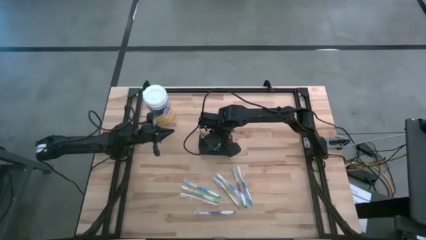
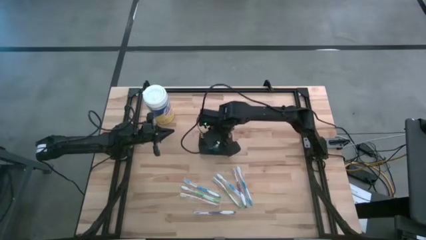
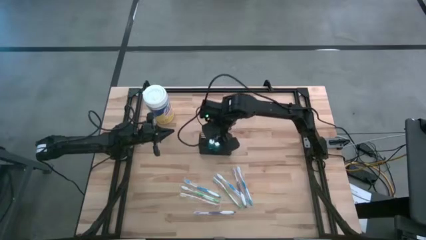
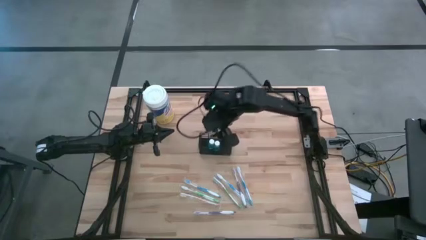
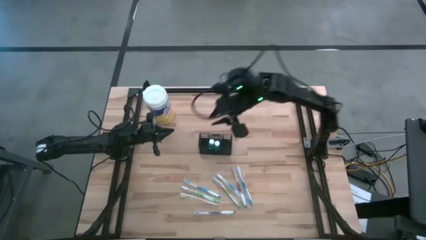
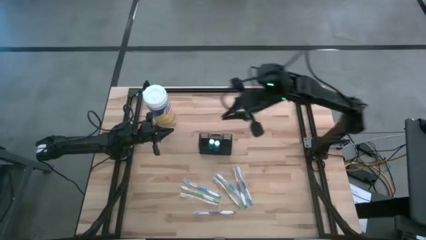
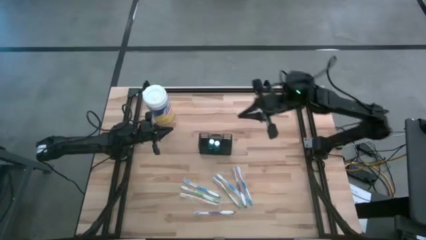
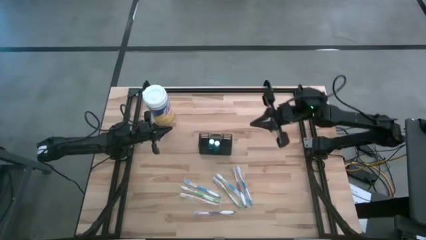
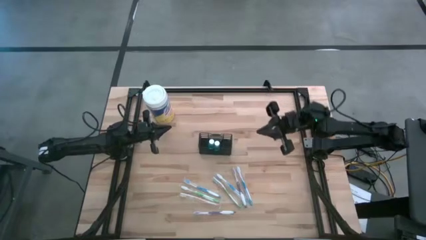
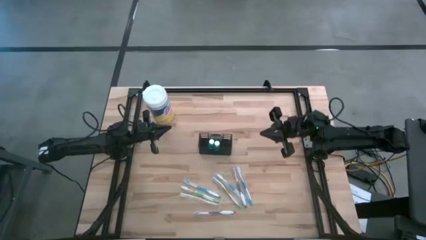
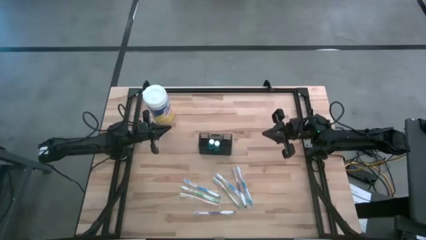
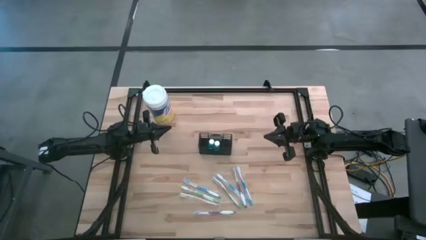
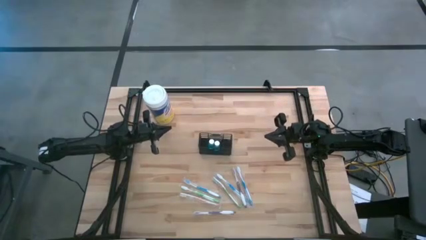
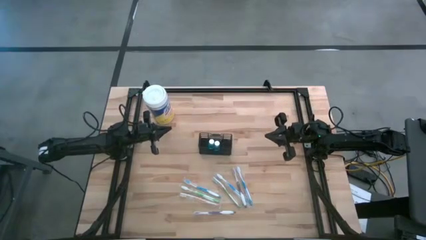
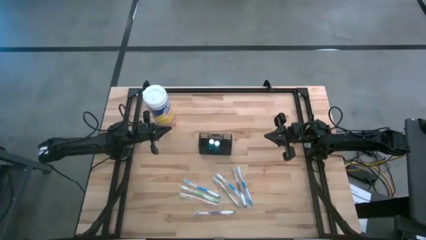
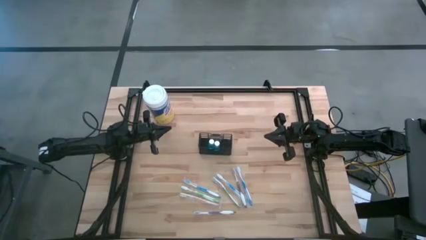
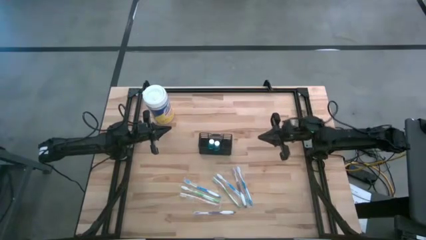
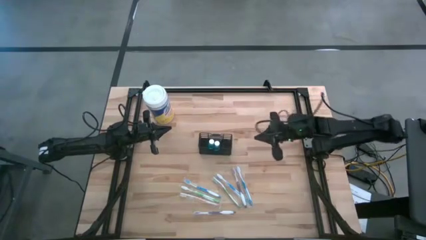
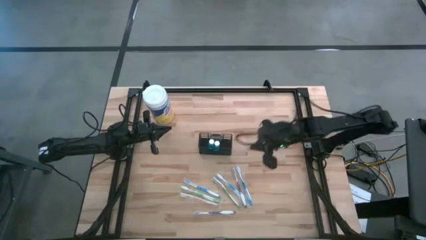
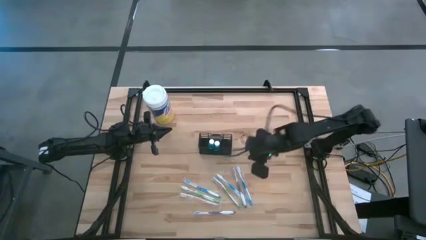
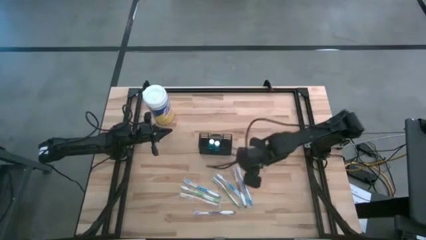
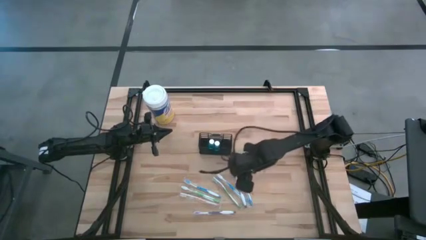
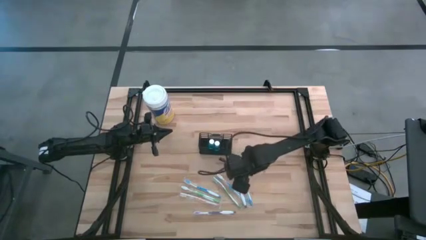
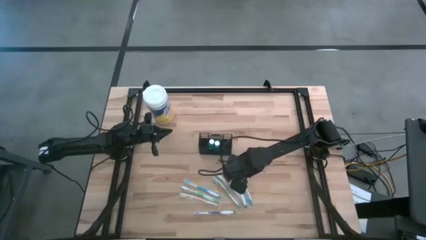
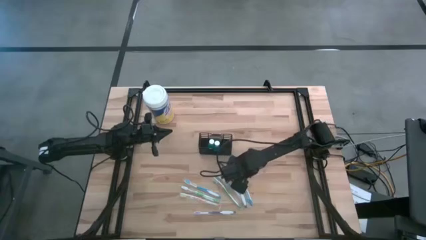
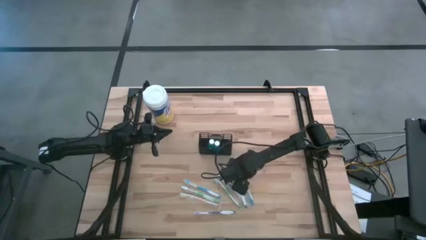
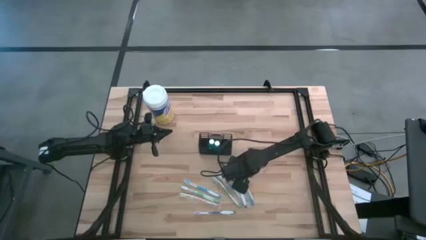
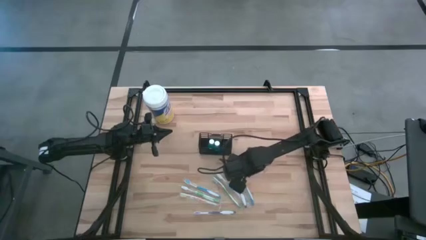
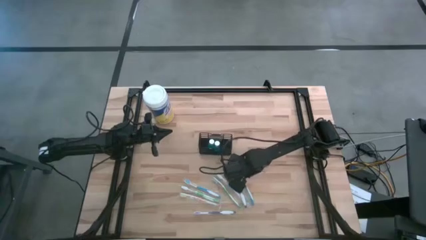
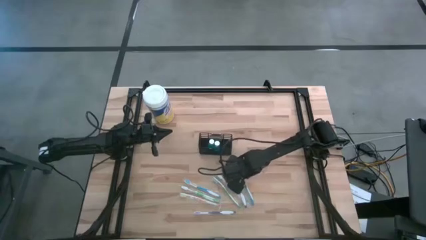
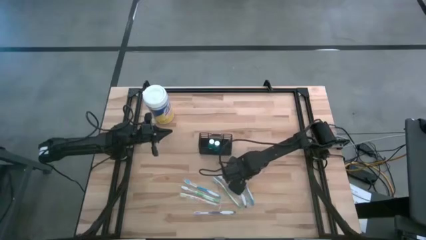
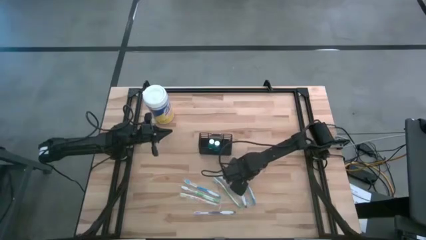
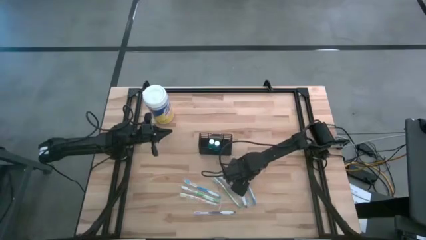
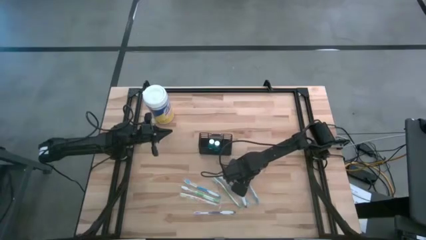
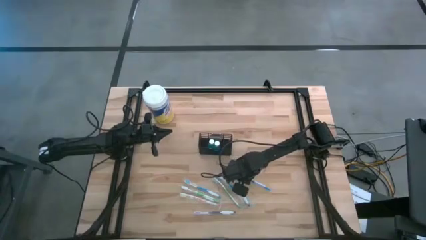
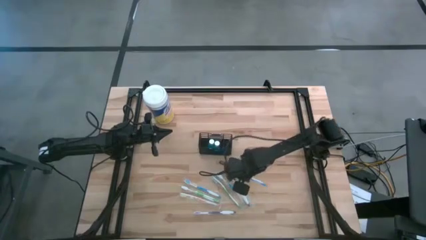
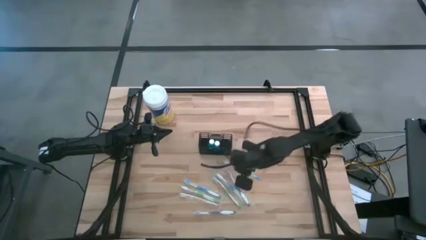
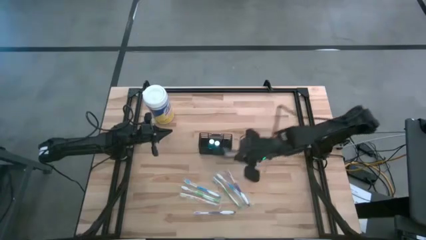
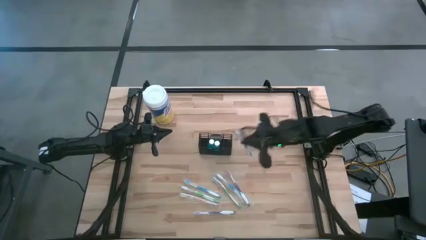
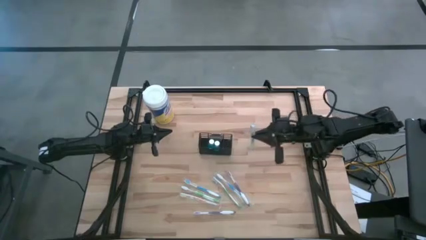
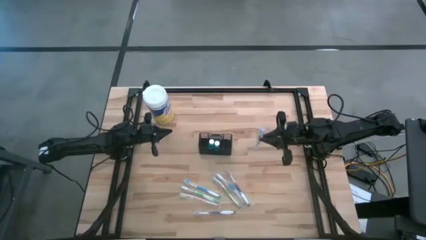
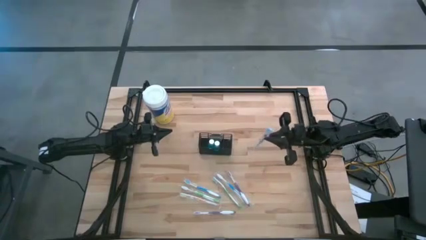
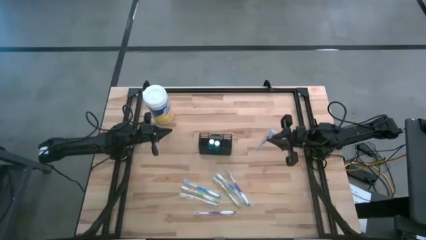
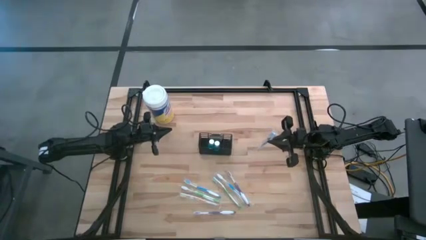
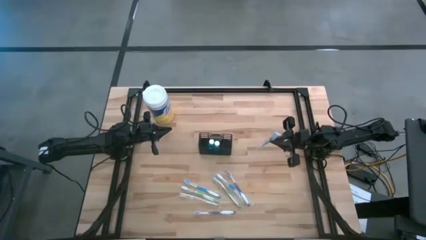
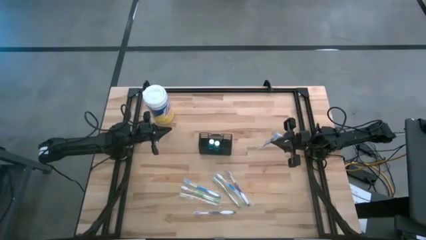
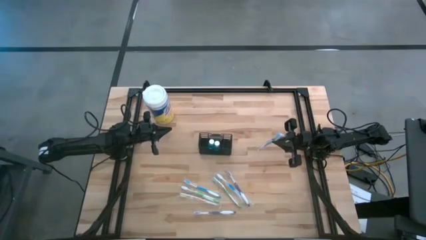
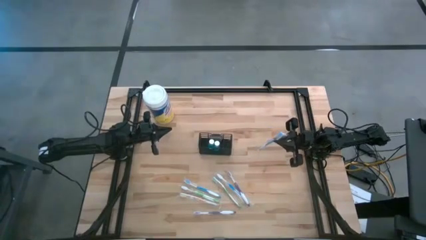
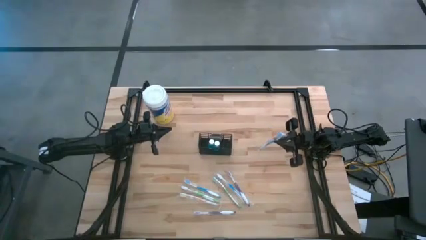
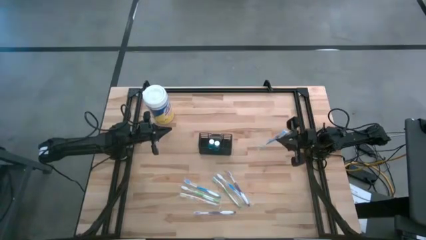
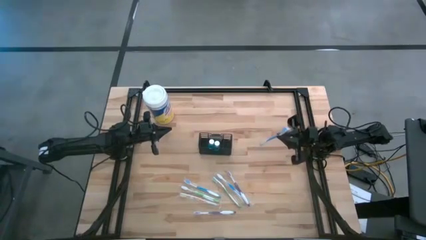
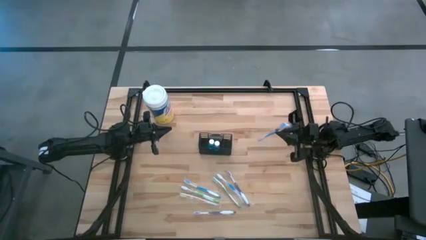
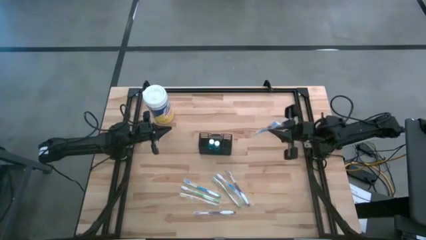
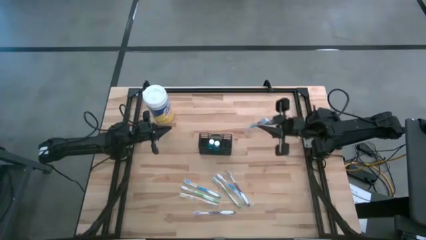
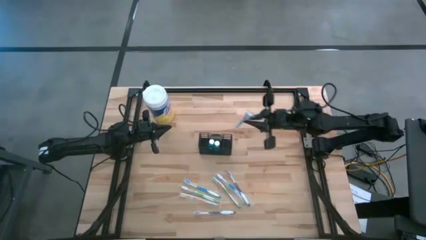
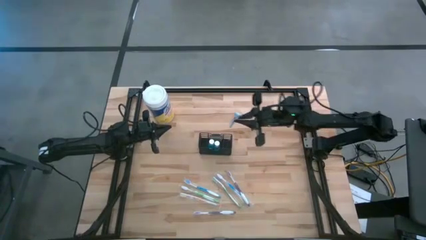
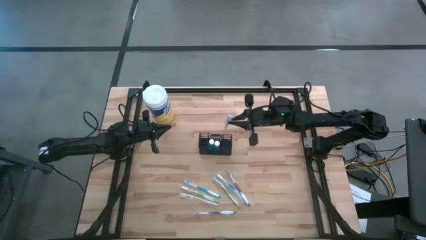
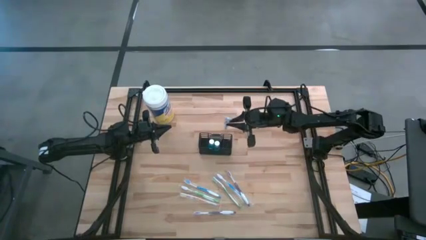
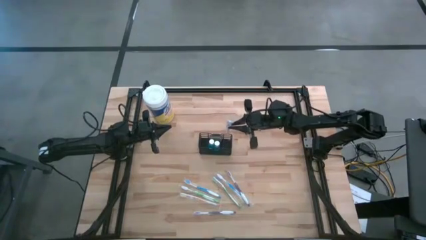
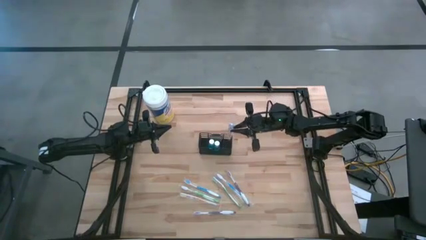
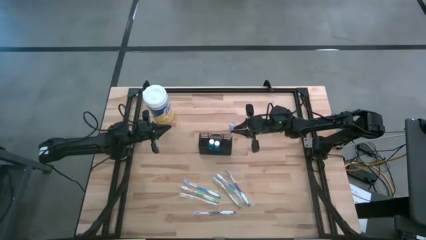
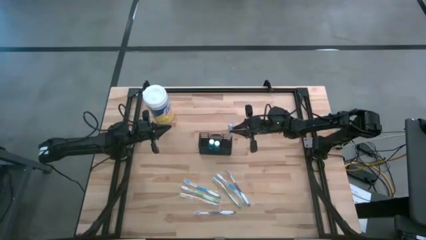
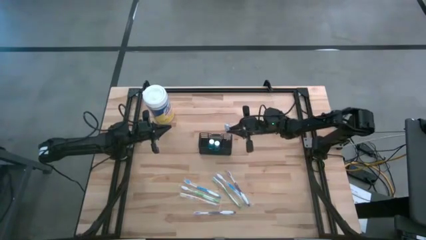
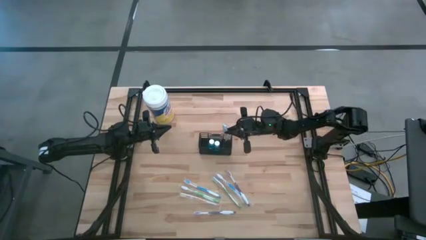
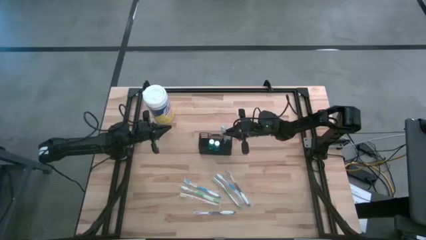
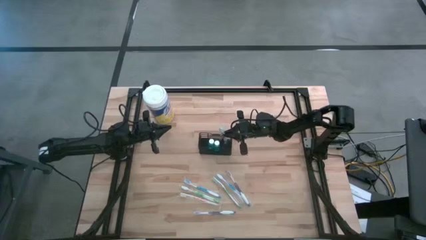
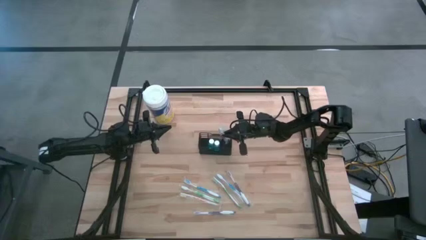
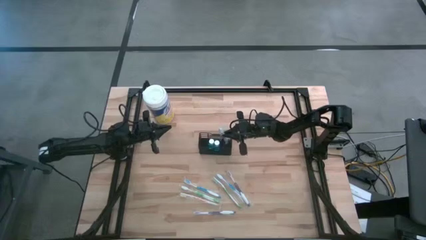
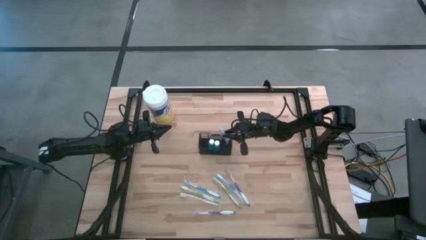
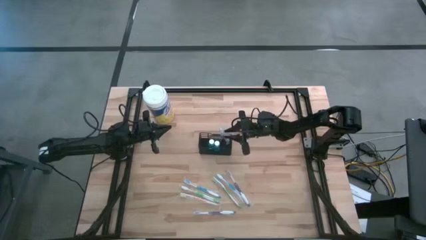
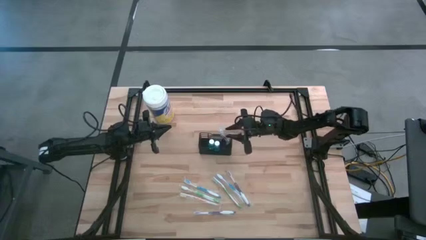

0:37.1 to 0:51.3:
Task: Pick & Place toothbrushing station
Put the right blue toothbrush into the mesh organizer

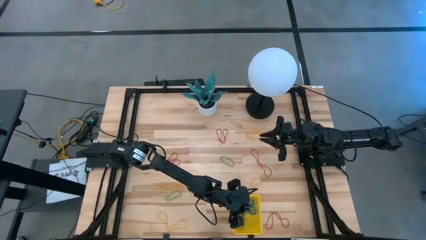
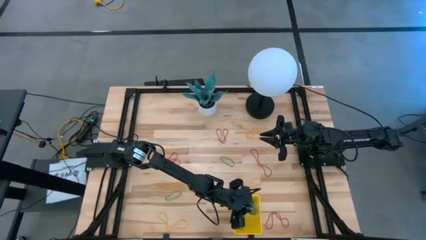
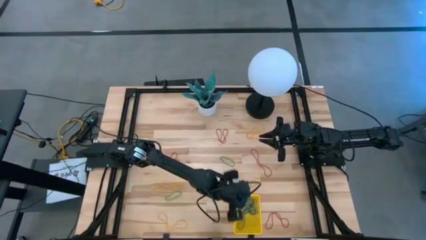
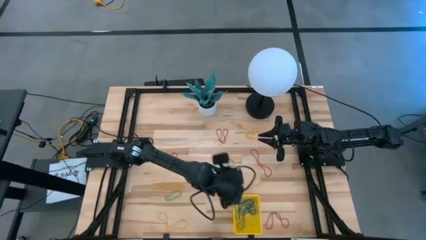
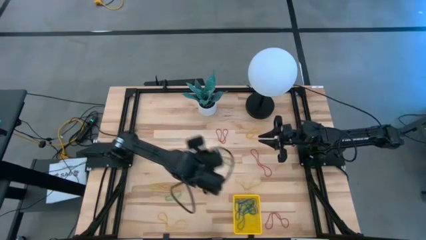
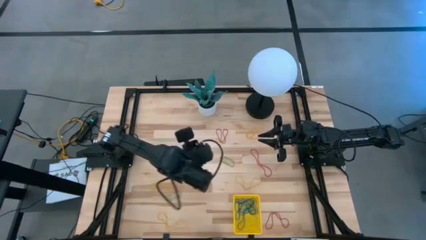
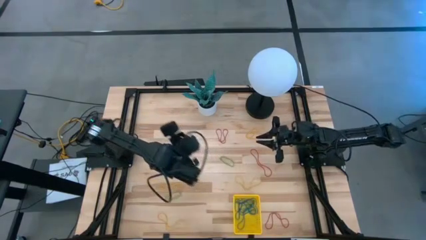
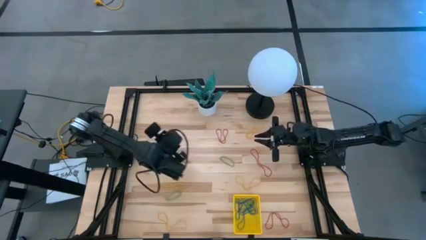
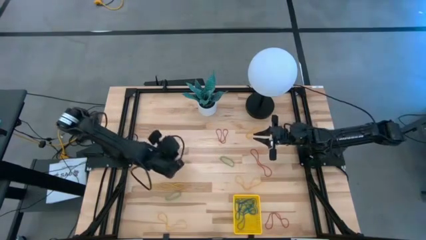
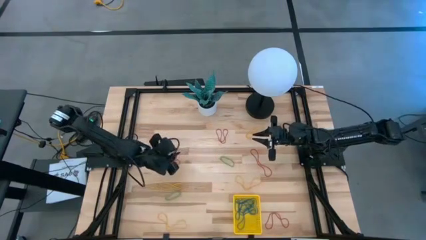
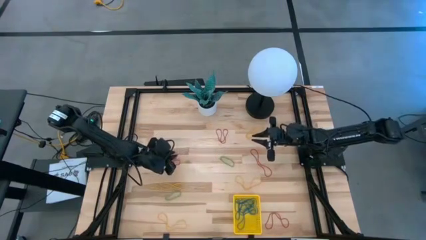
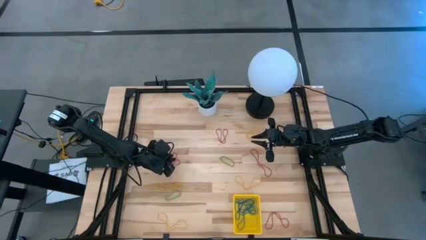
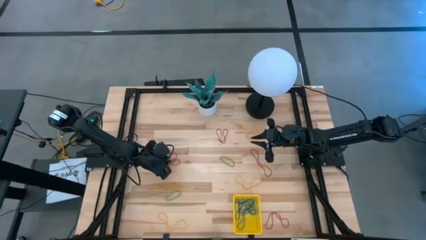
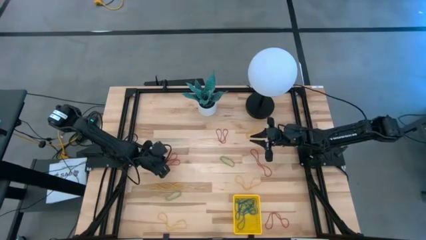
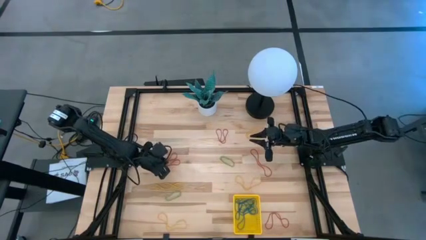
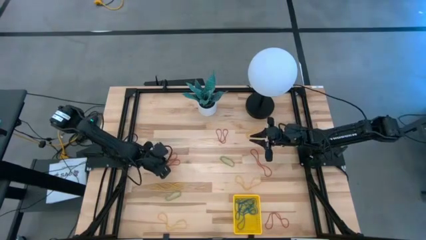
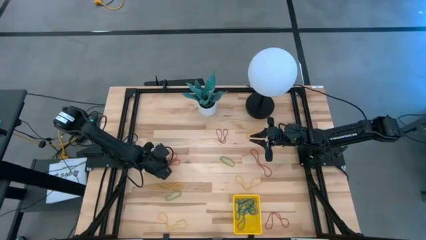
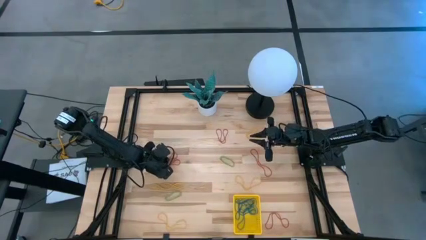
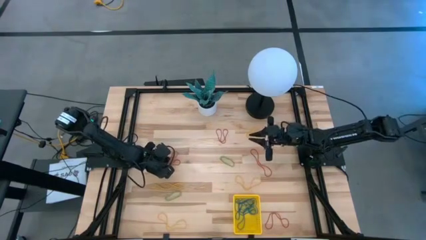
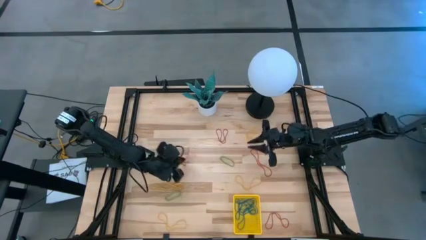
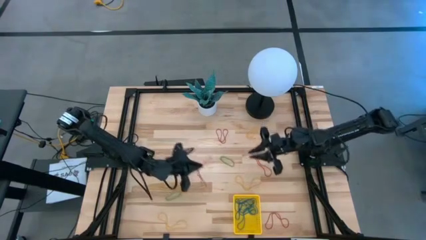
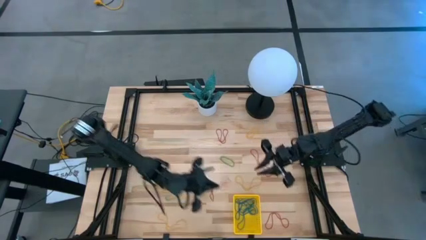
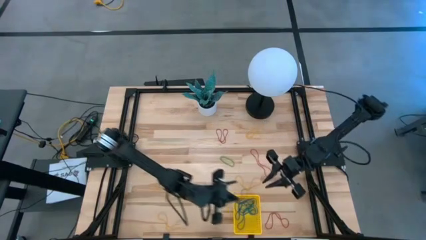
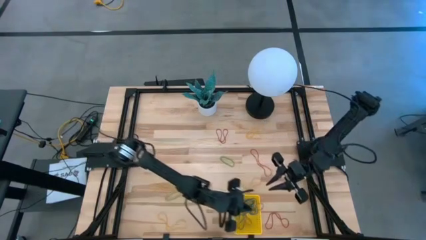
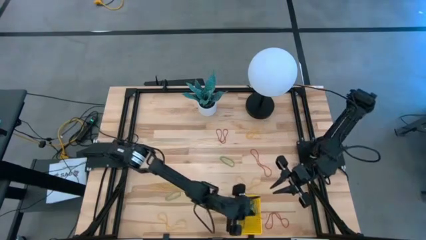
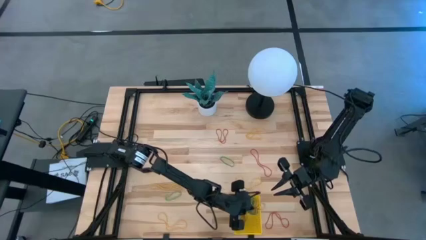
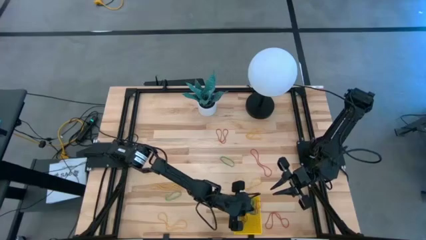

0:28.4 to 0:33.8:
Task: Pick and place rubber bands into bin
Put the red rubber band into the yellow basket
